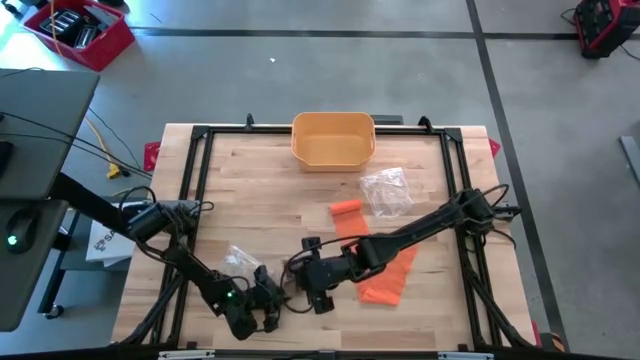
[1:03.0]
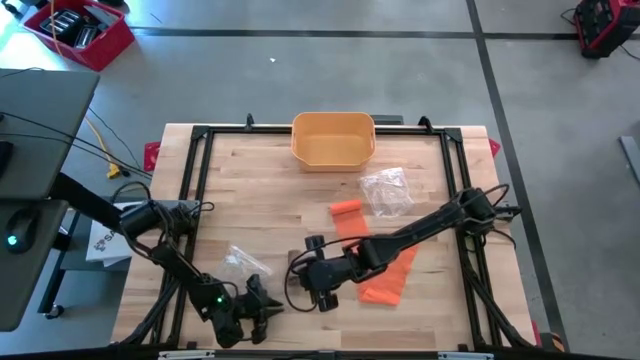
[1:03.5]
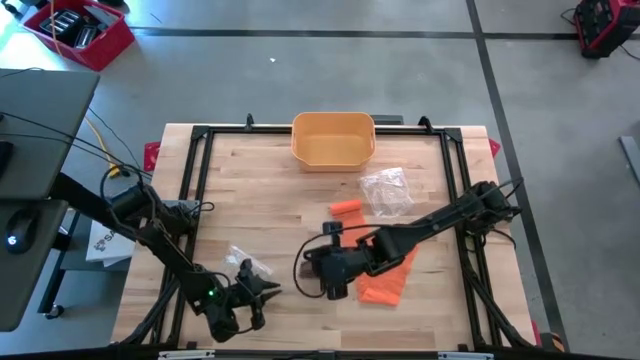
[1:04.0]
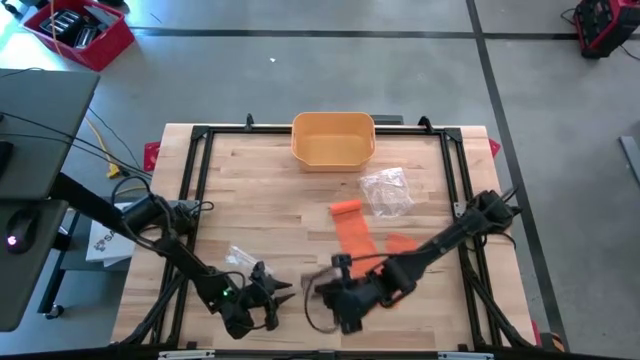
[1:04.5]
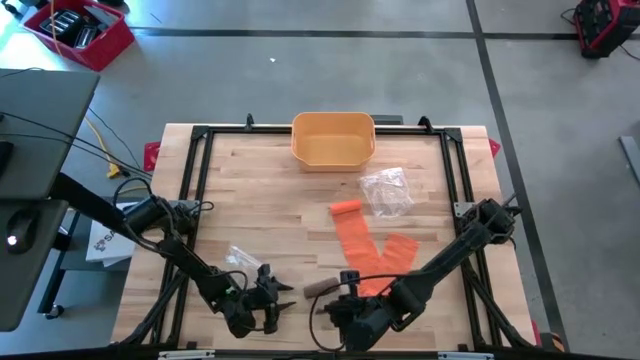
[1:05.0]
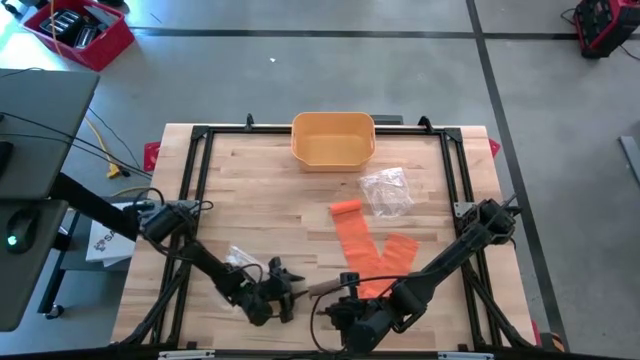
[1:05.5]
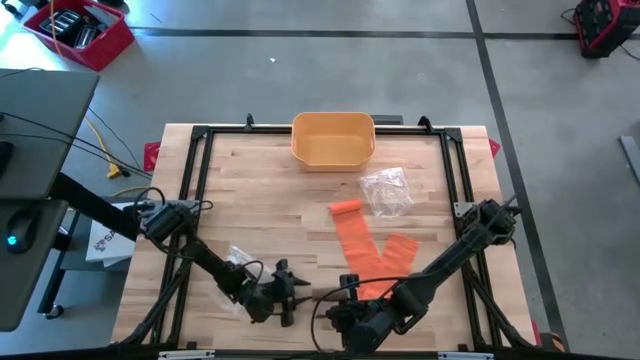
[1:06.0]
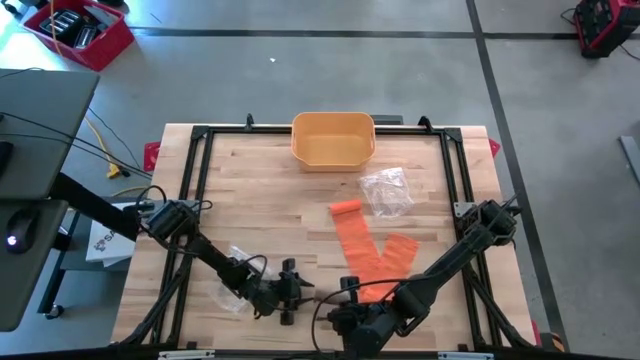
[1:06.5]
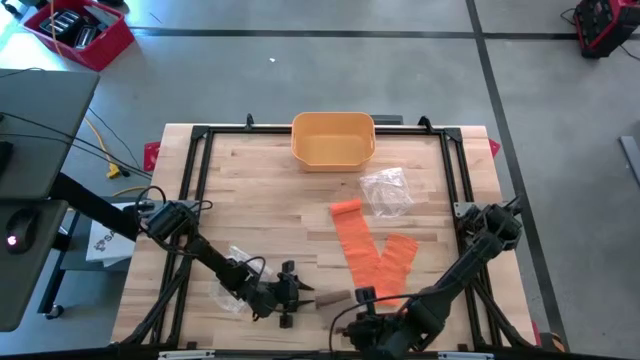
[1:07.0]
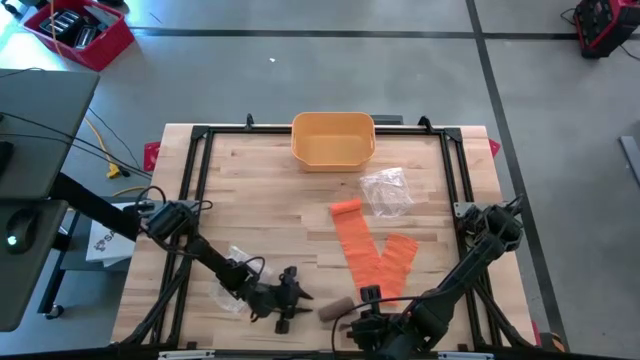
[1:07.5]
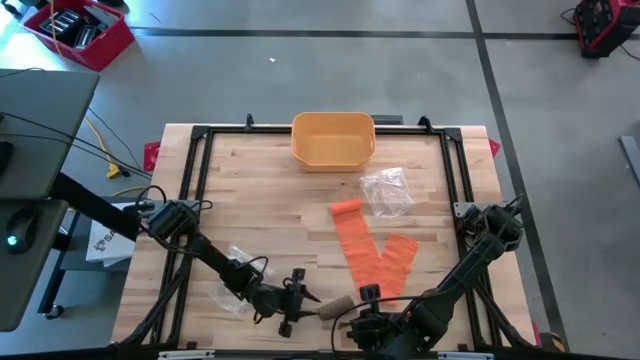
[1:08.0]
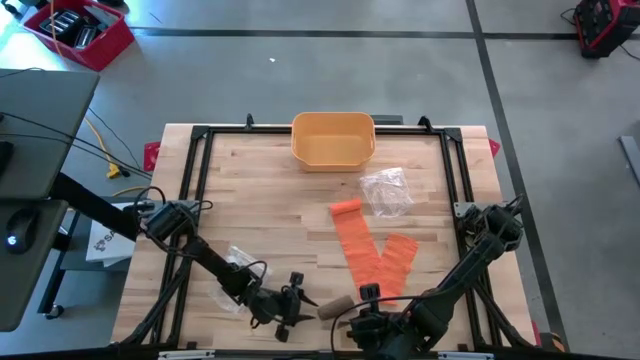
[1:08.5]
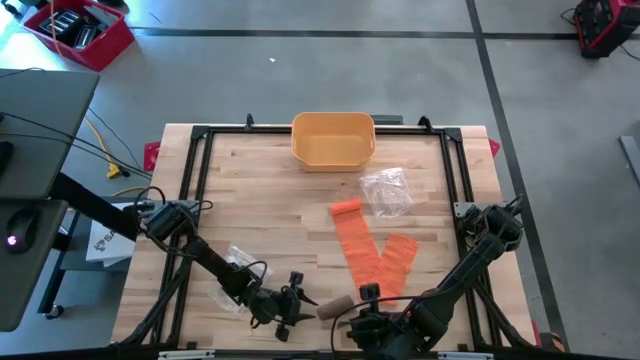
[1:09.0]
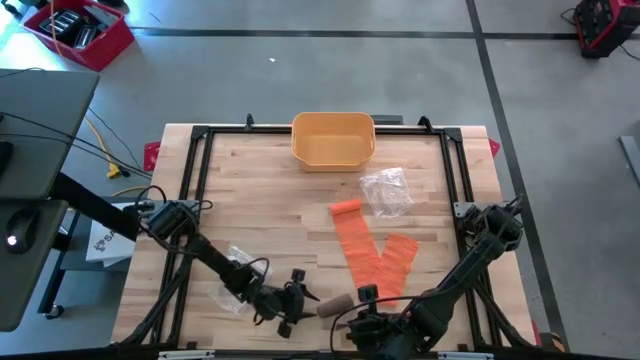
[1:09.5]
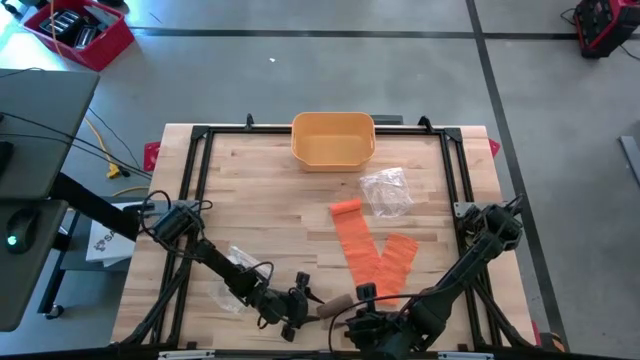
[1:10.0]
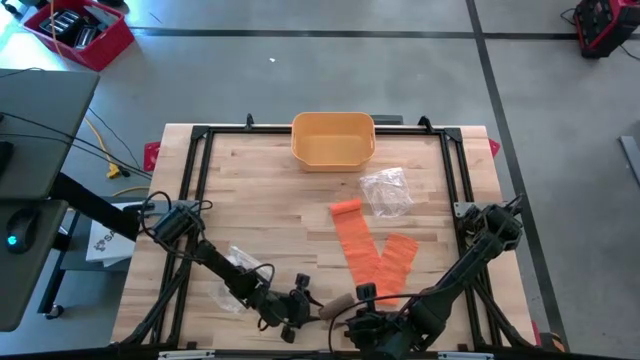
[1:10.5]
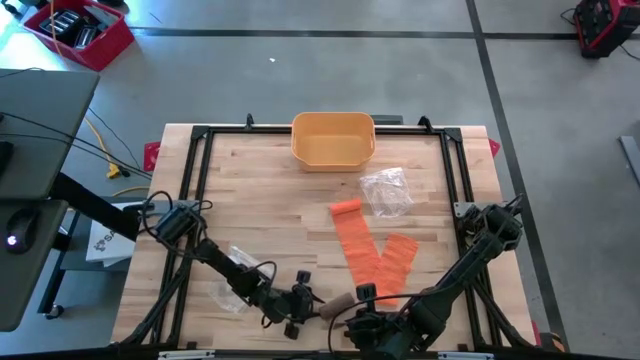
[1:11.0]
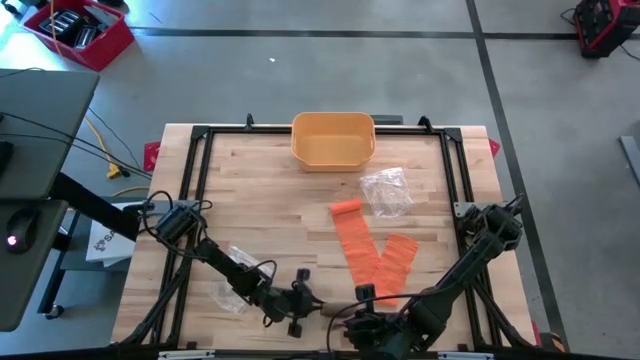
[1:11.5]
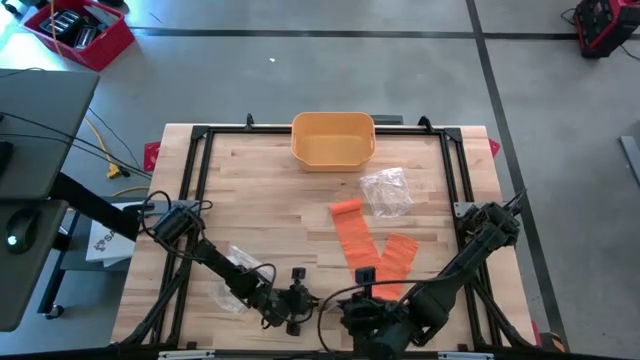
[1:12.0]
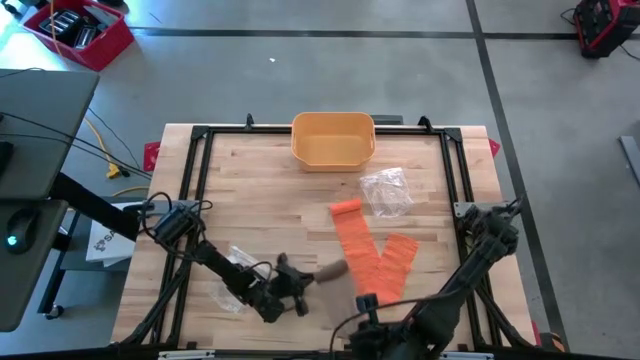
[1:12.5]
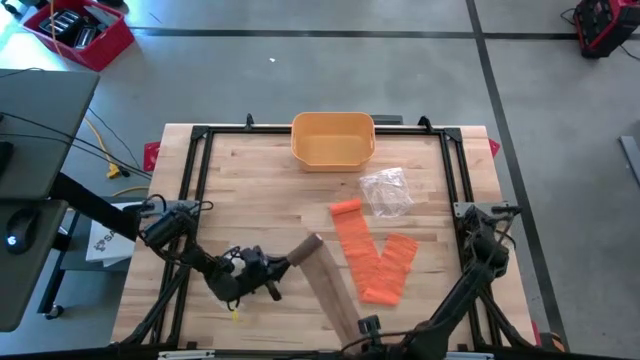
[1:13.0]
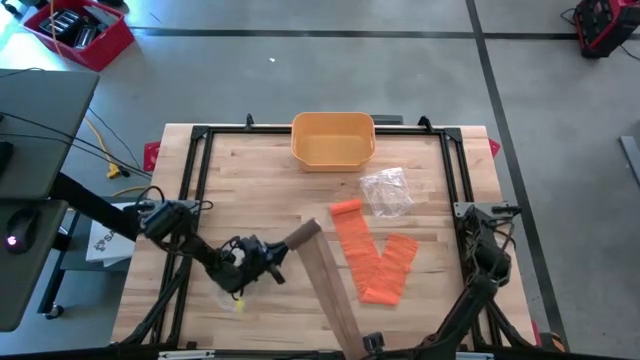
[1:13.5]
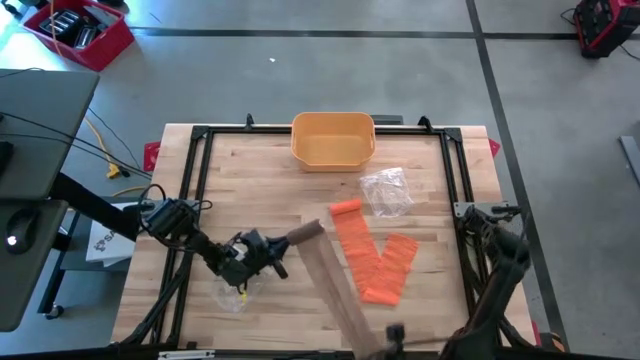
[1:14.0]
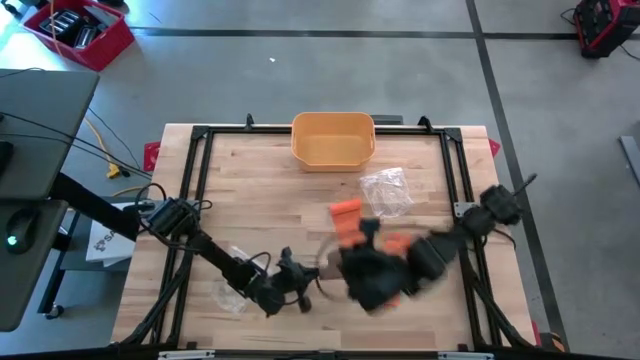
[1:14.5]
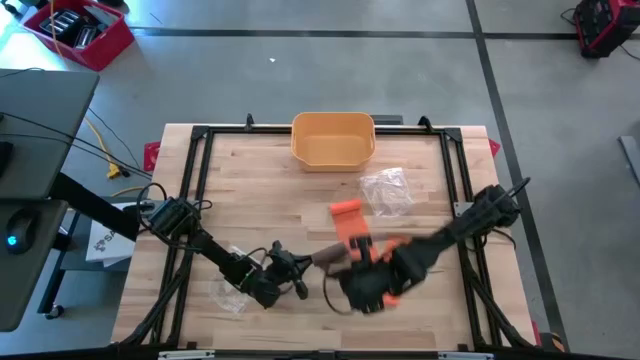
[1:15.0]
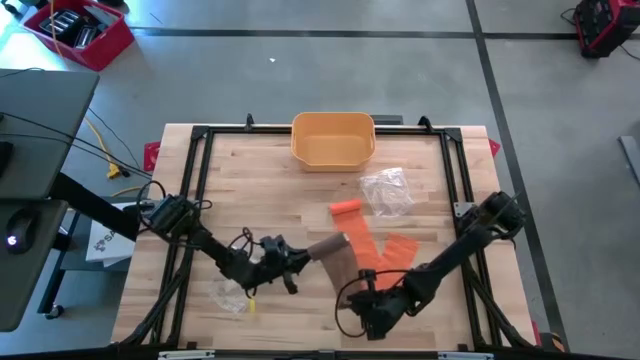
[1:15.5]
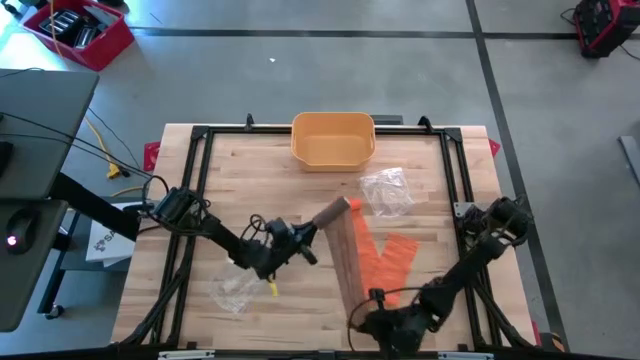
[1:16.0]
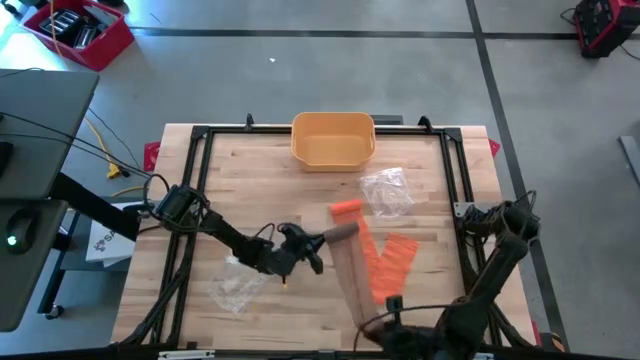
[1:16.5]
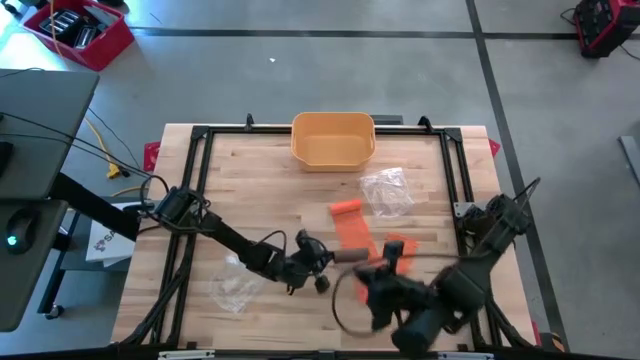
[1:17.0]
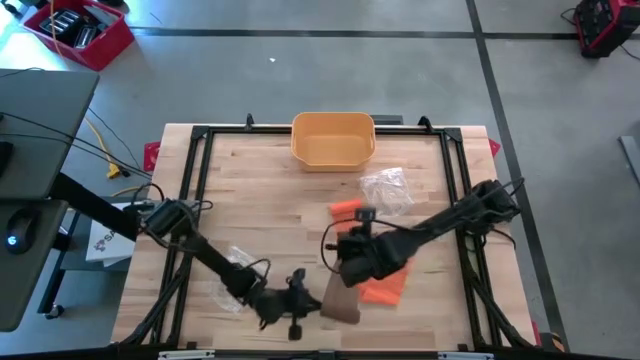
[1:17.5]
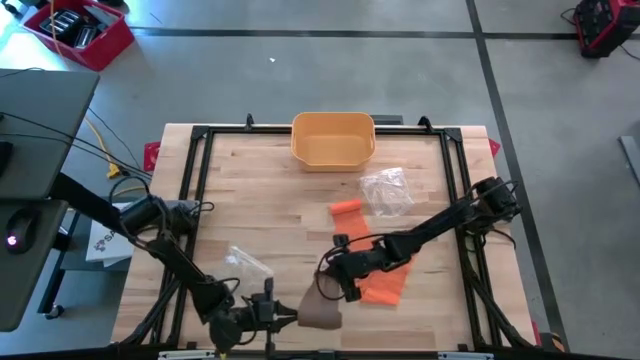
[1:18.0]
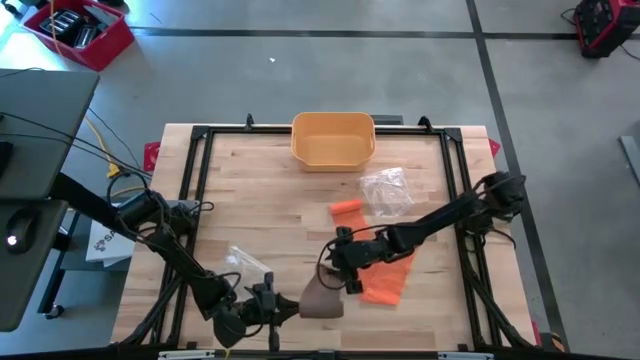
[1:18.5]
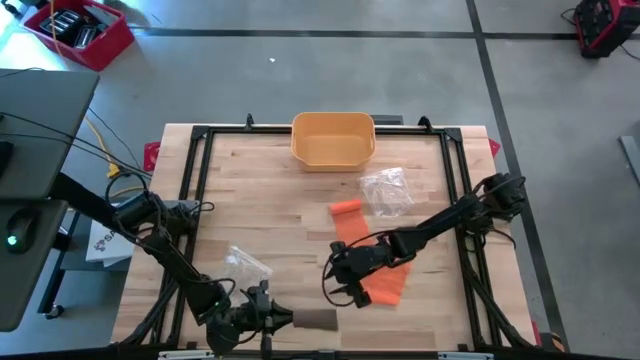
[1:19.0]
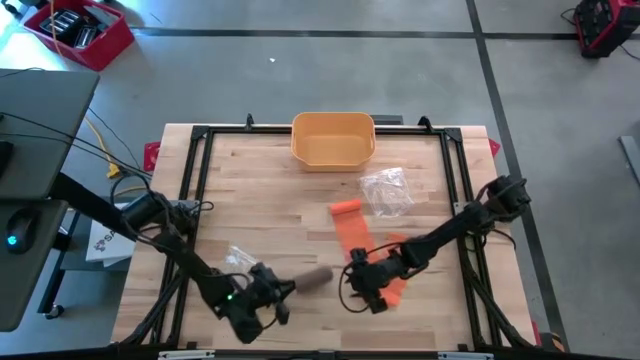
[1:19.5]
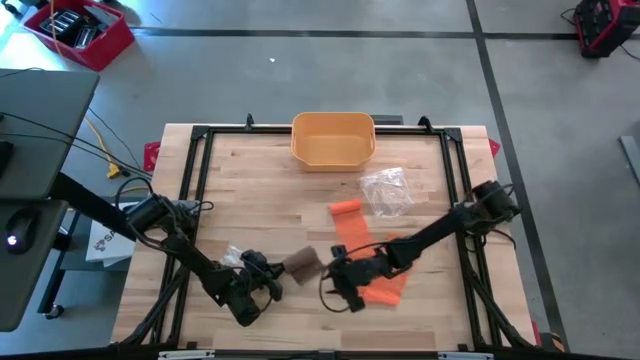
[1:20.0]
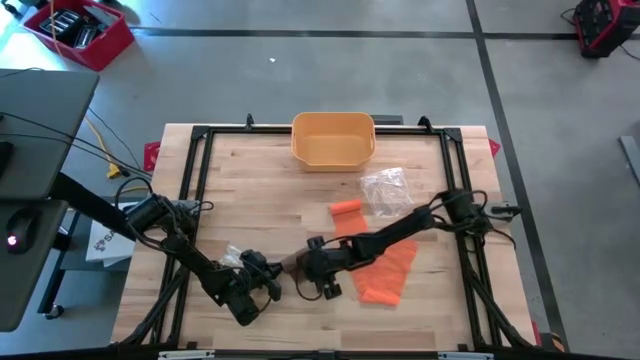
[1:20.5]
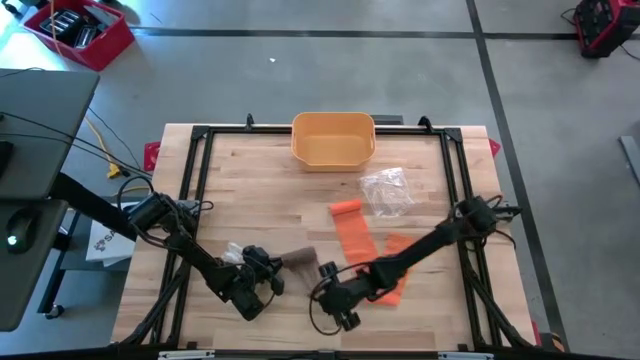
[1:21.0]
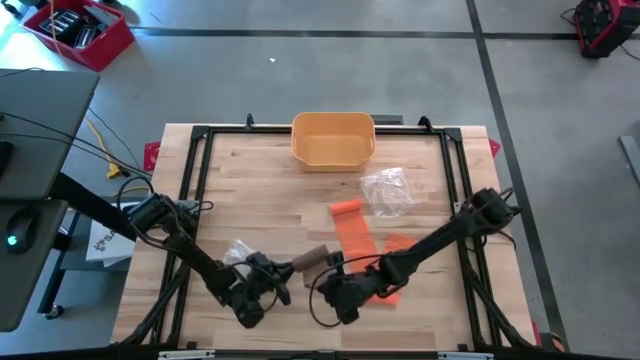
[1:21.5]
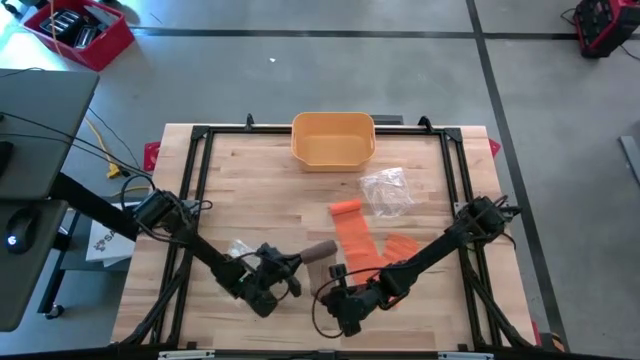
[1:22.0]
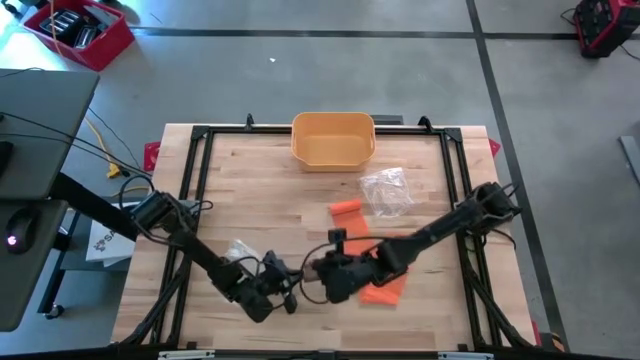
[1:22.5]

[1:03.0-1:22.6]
Task: Roll bandage
Roll the brown bandage

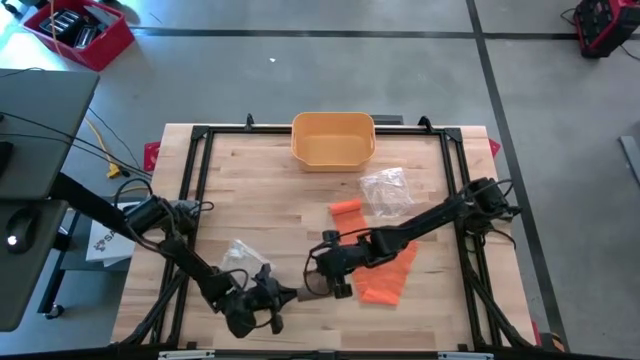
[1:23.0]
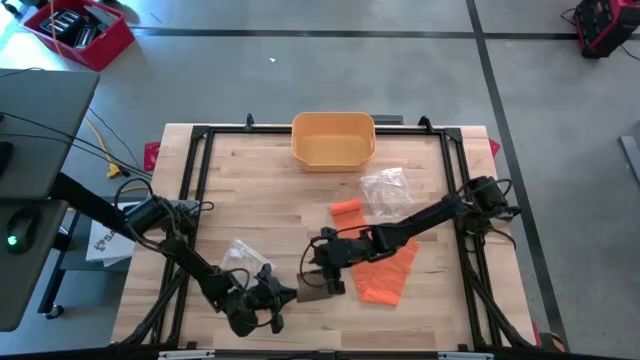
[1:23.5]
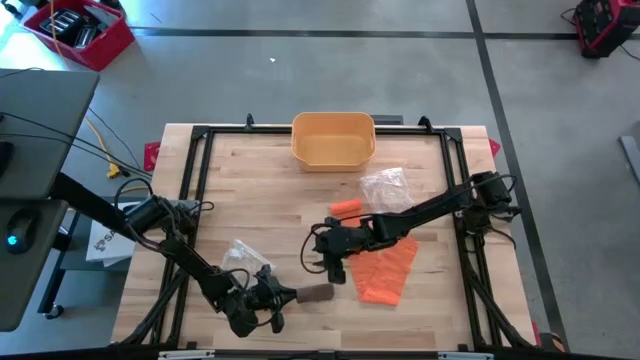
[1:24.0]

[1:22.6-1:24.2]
Roll the brown bandage
